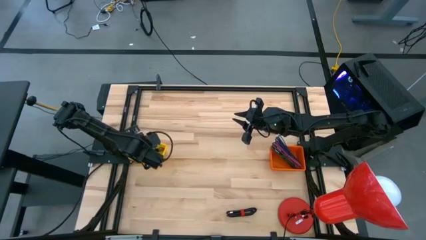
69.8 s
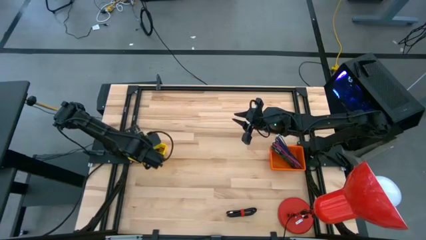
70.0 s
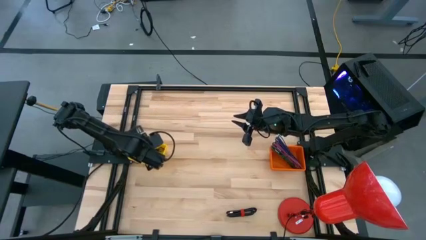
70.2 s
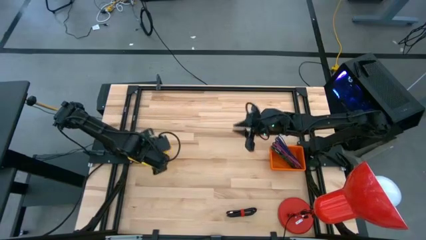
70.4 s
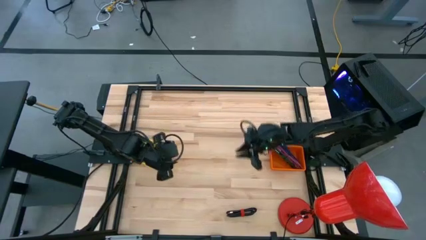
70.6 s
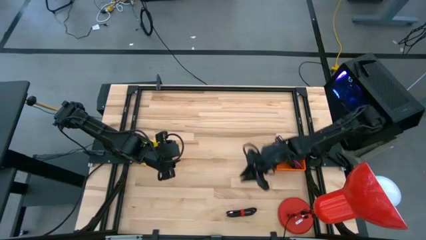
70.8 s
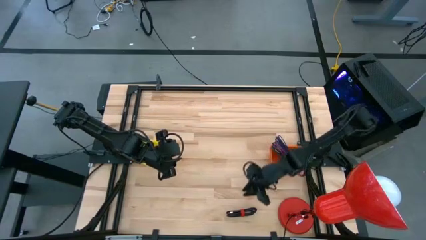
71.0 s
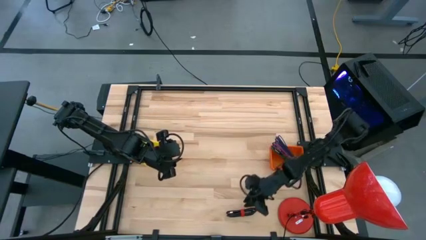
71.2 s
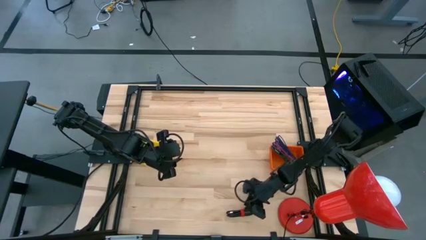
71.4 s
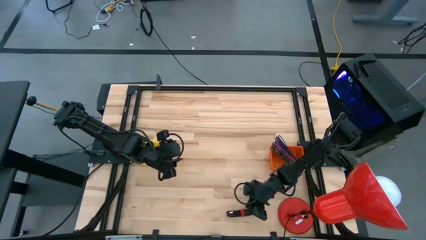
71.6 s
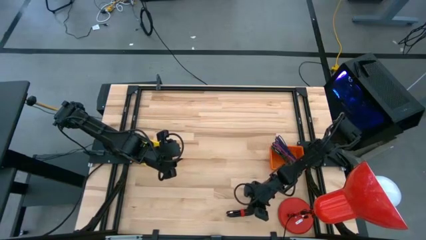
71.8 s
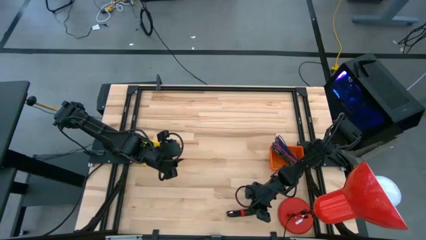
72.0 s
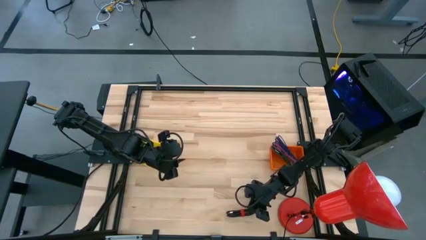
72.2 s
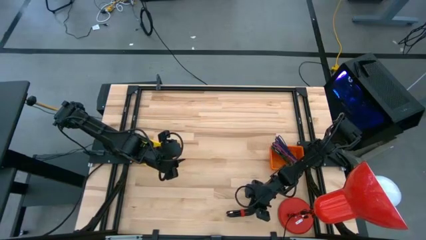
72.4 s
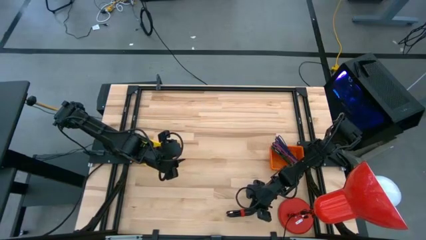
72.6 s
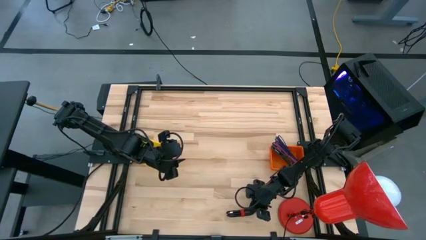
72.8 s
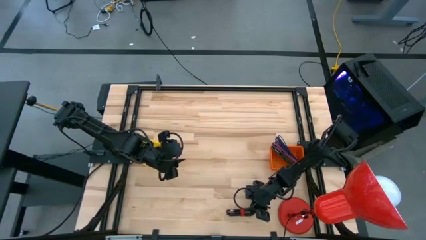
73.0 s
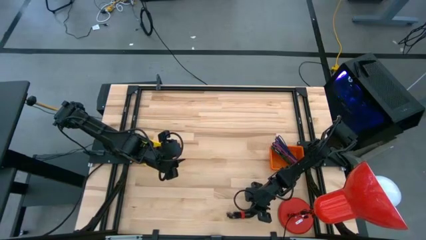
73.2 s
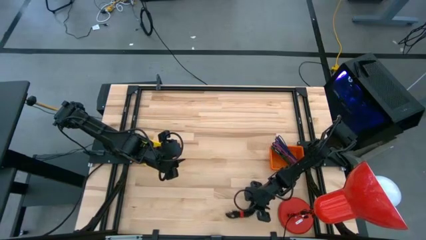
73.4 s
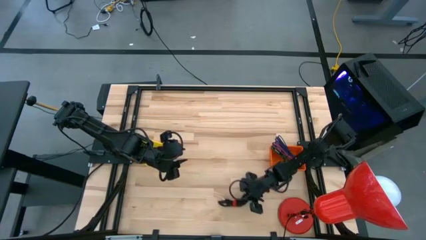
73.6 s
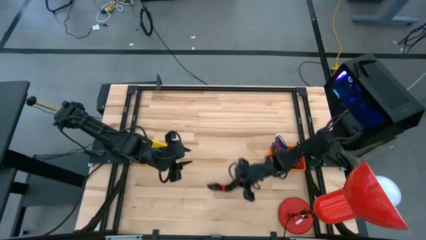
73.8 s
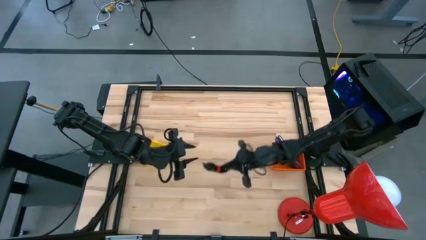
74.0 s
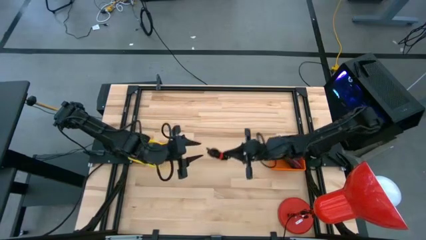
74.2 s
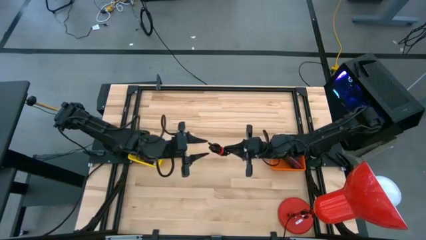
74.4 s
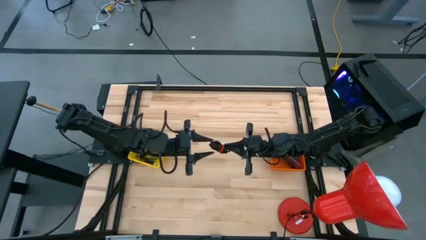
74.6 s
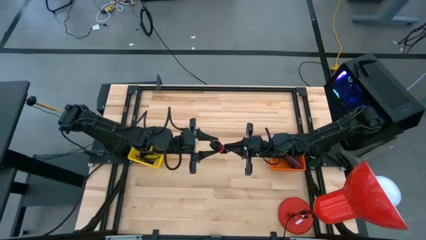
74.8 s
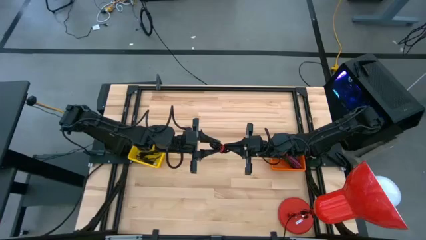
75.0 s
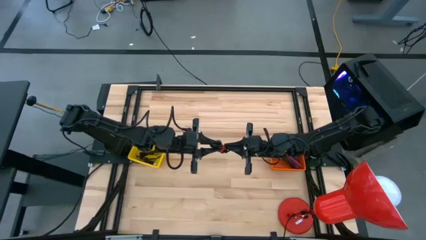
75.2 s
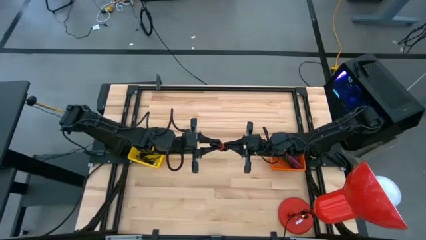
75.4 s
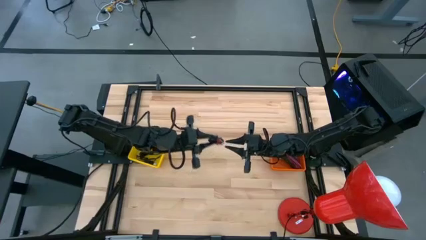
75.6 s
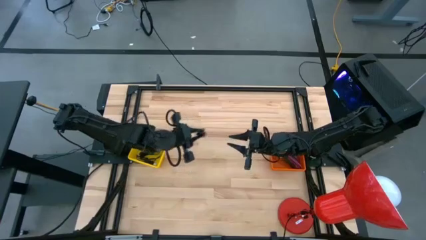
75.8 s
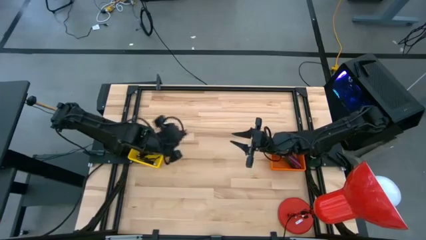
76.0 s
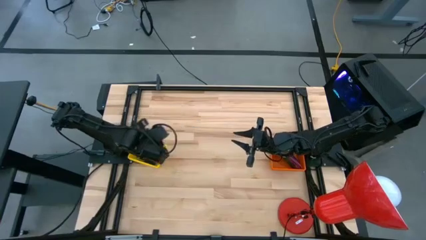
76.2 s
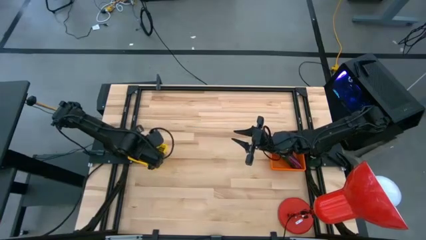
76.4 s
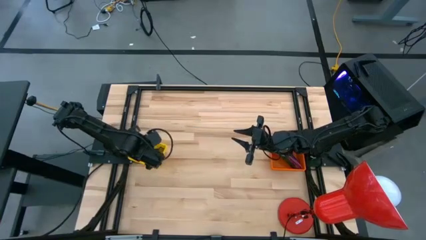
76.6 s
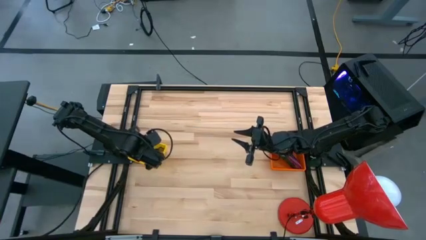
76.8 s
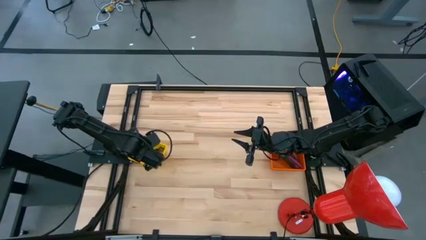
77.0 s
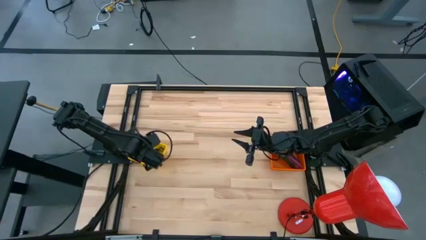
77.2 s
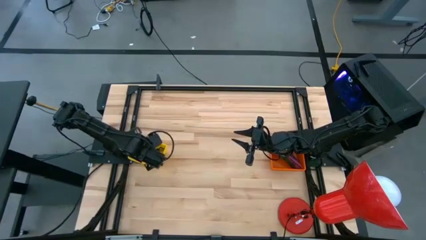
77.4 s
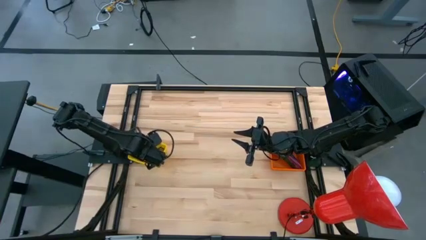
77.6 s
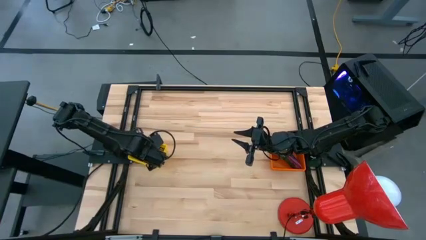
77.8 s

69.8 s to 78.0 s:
Task: Pick & Place USB Port
Put the black charger cable into the yellow basket

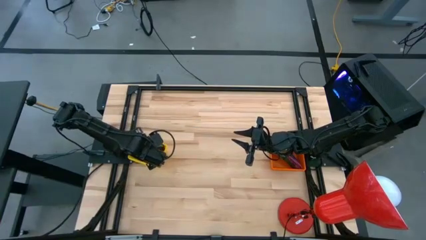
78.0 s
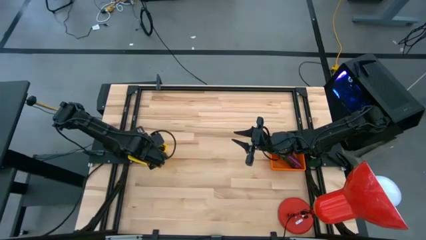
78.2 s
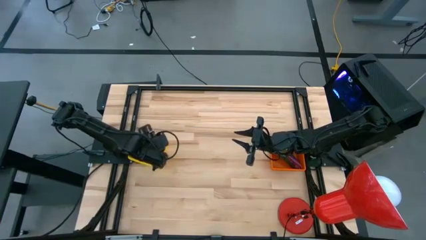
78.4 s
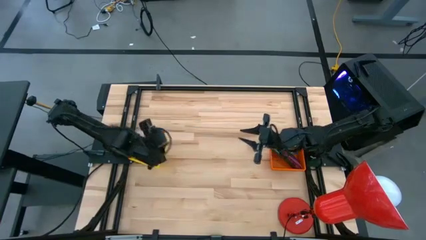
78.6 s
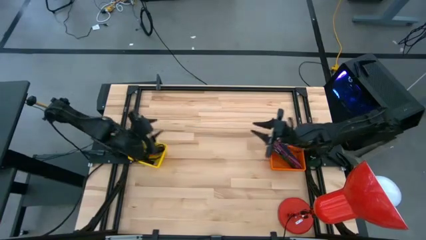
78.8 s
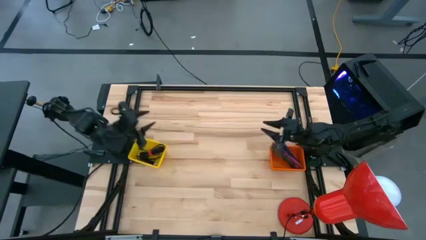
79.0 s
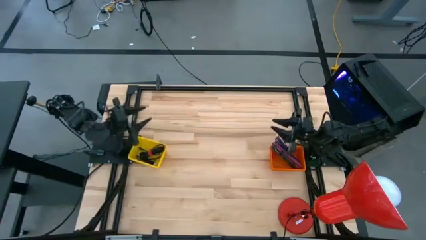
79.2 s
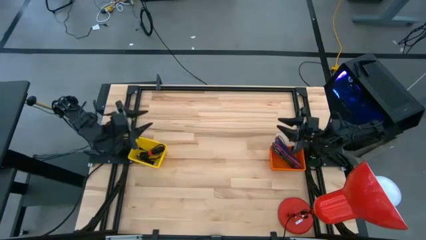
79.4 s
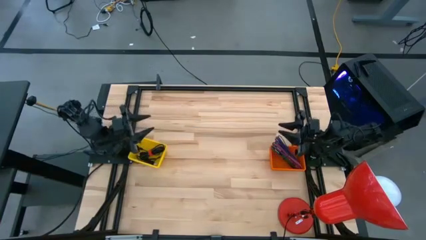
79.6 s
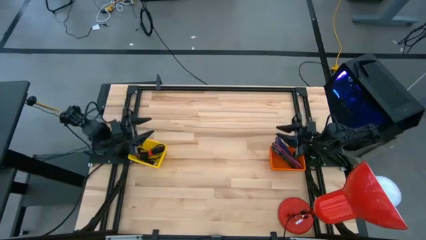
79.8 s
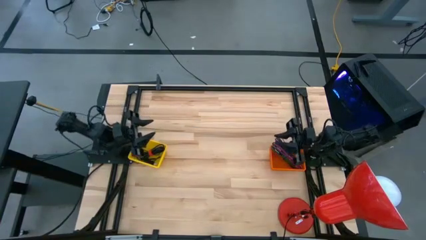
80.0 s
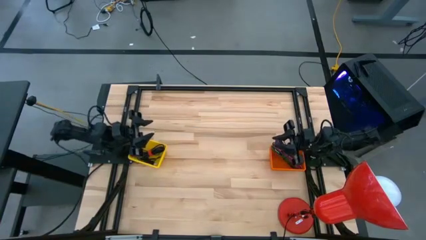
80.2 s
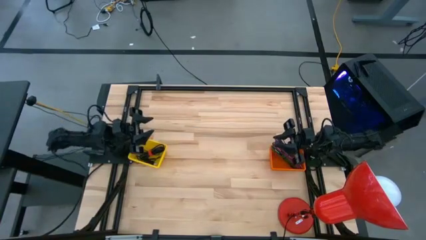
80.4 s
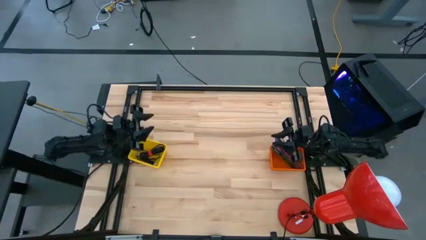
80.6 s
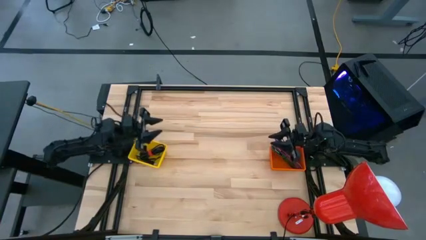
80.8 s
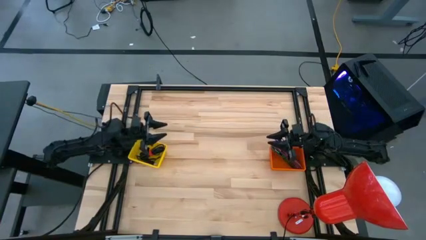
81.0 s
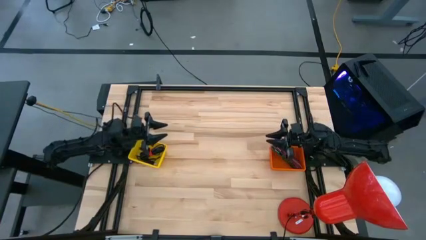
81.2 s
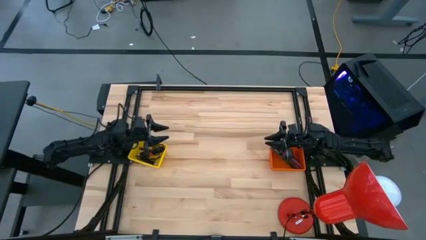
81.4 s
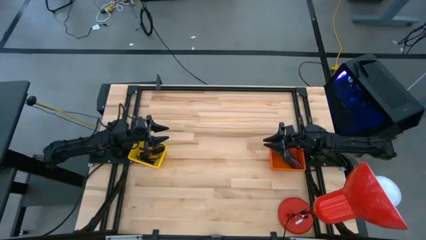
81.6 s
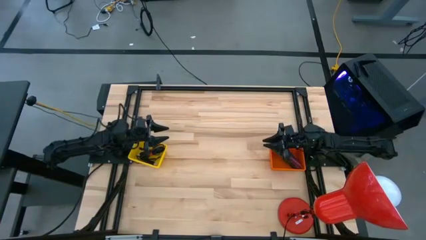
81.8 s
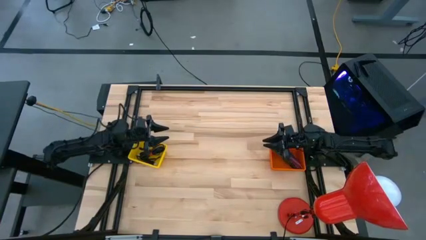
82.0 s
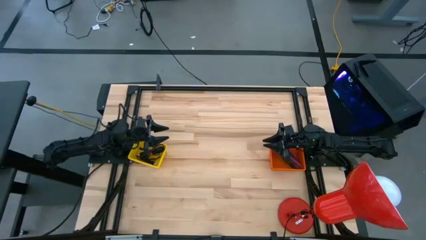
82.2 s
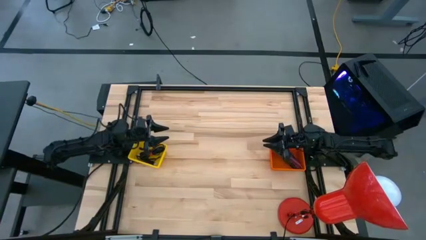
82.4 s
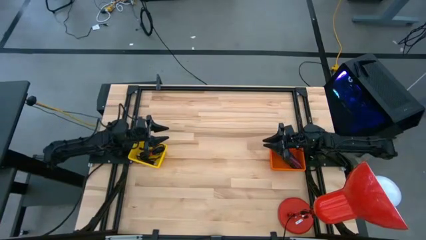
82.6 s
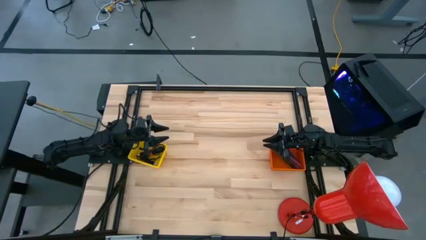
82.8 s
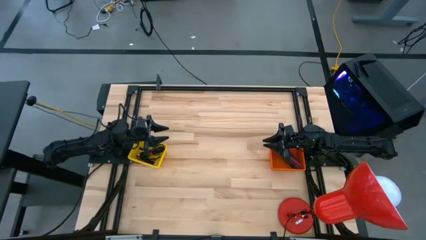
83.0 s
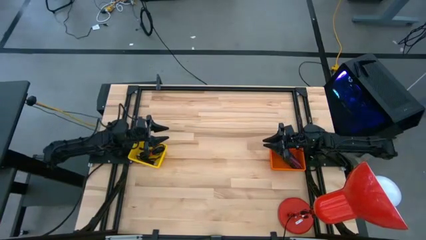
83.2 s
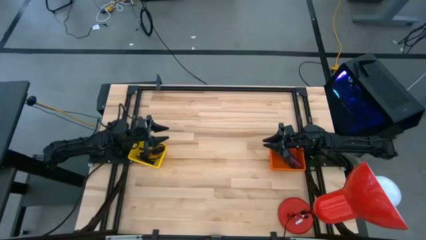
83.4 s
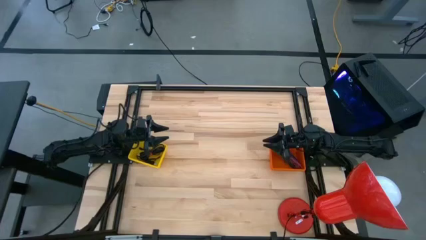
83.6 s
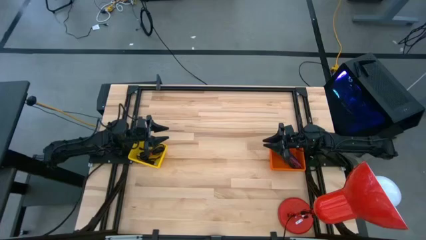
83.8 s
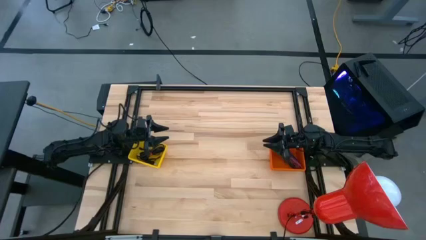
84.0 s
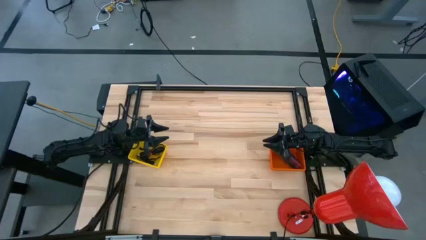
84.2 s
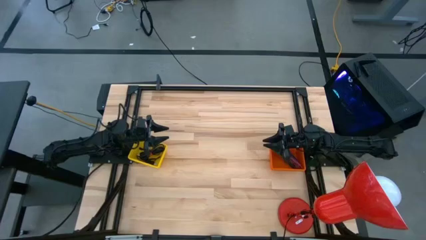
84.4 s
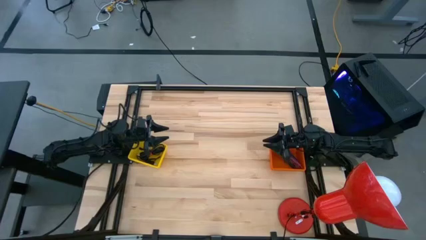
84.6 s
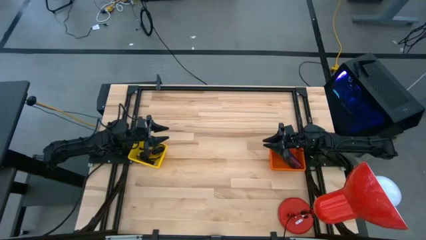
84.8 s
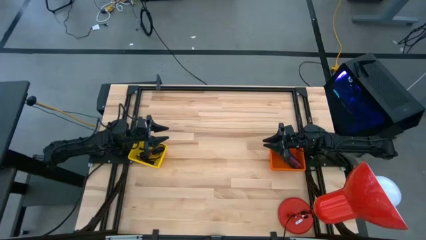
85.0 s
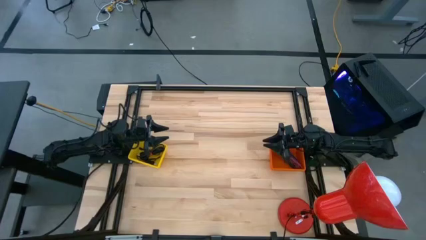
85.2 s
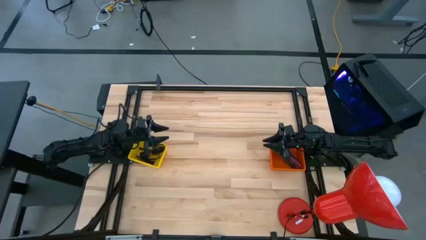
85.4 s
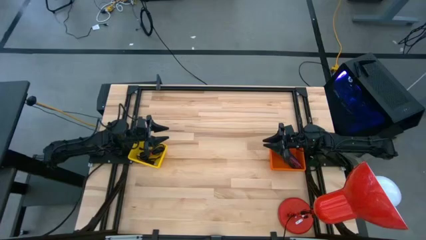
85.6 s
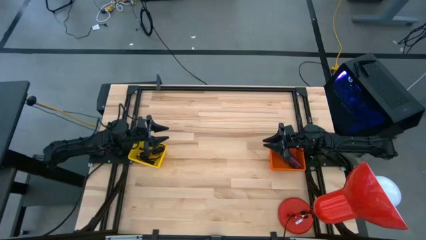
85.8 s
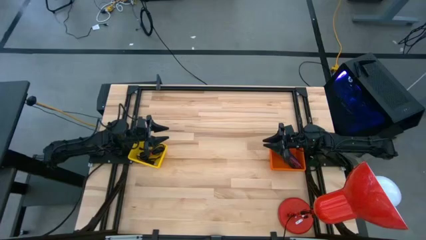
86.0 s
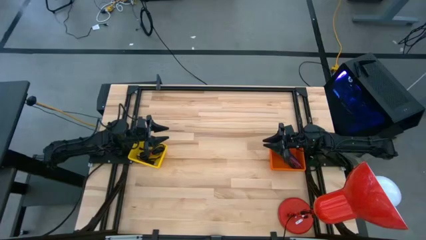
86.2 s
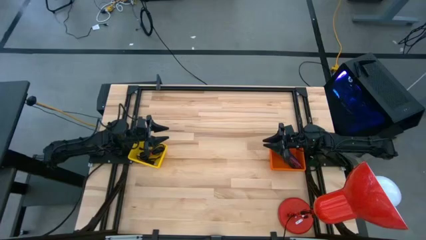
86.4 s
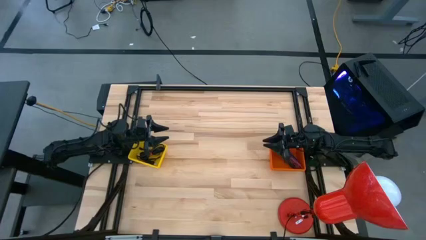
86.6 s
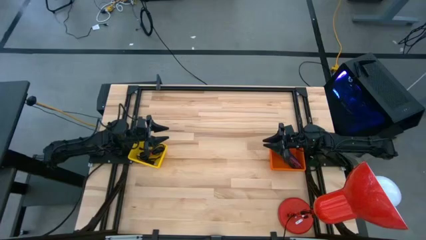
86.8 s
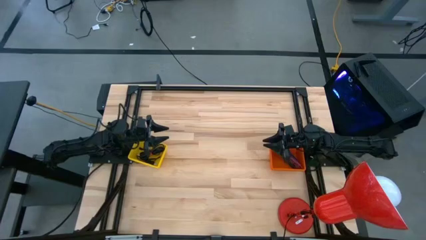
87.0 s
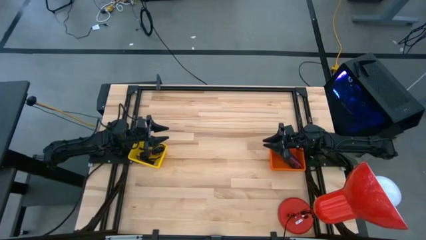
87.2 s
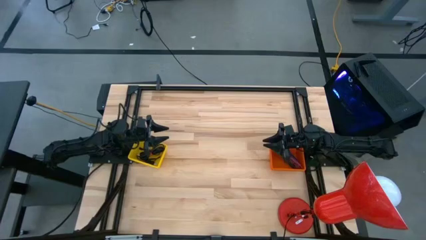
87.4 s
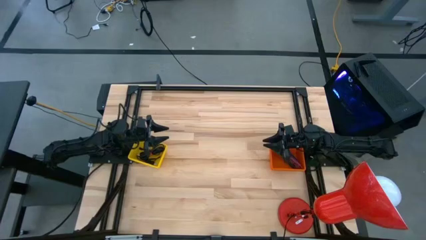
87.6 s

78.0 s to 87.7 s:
Return to Home Position
